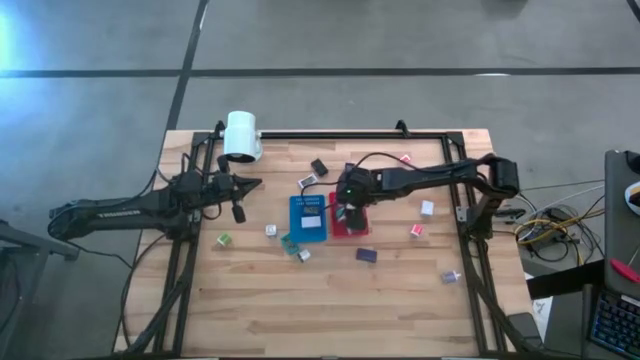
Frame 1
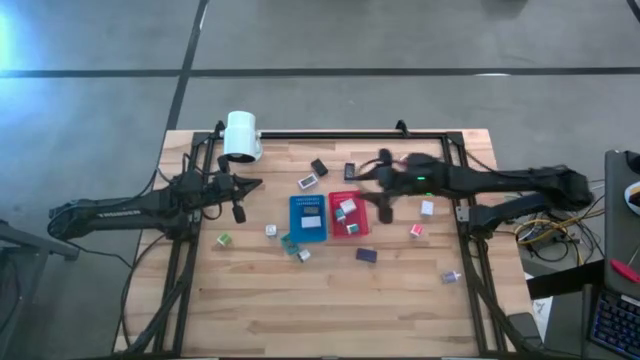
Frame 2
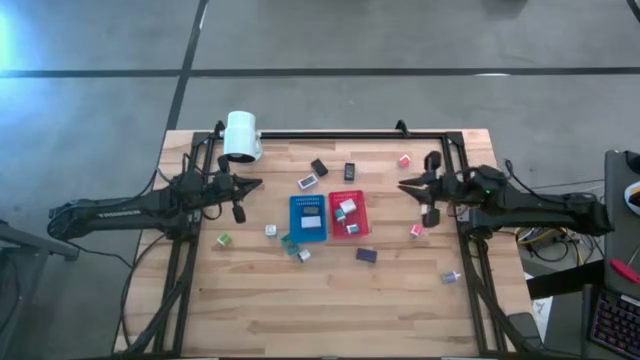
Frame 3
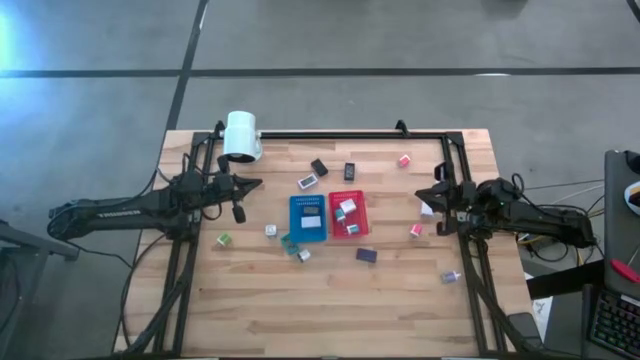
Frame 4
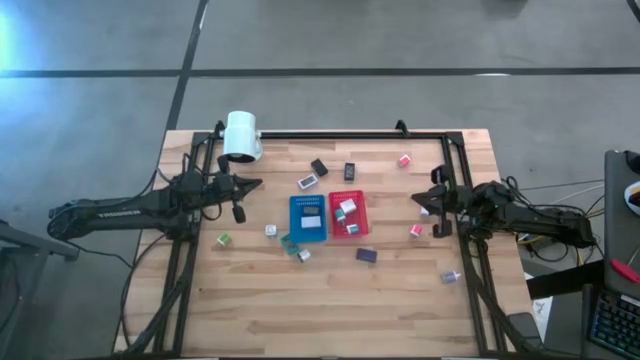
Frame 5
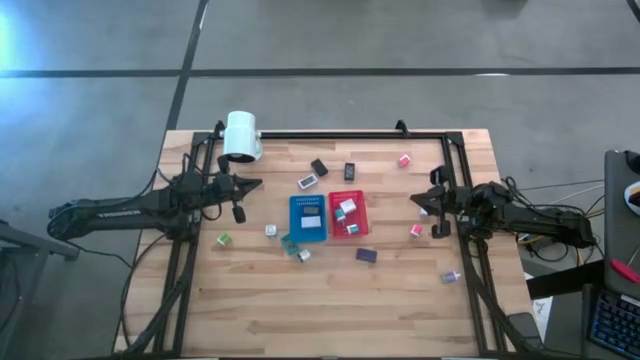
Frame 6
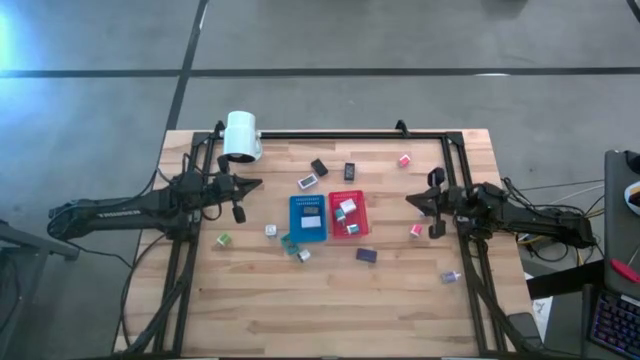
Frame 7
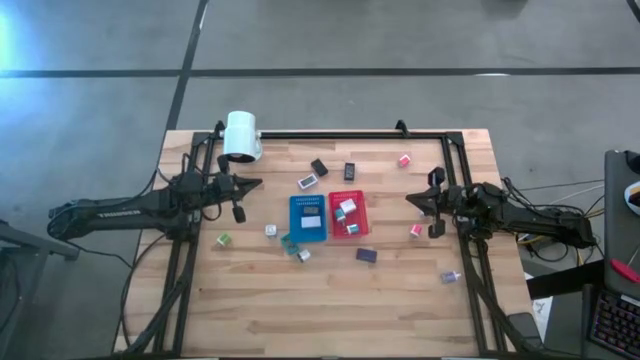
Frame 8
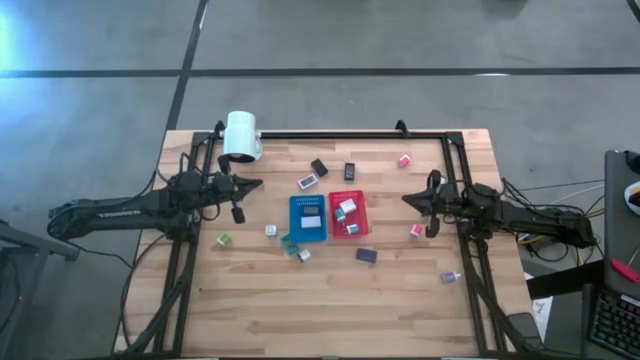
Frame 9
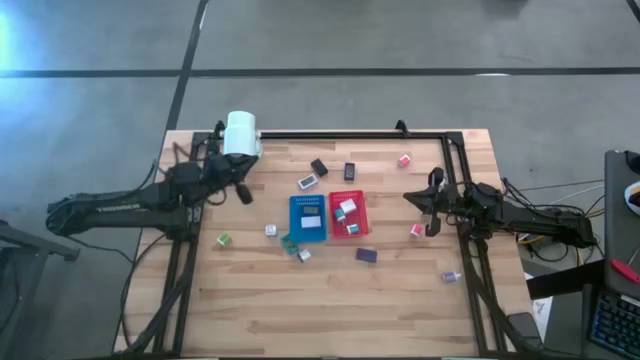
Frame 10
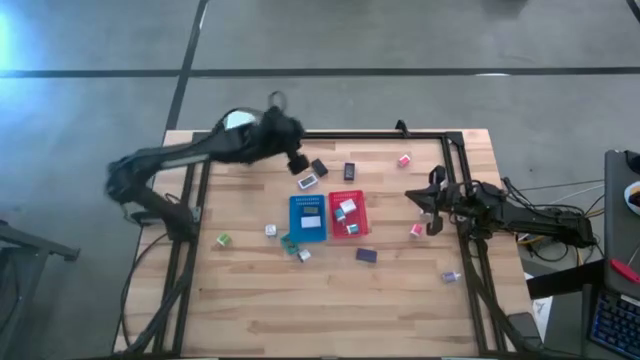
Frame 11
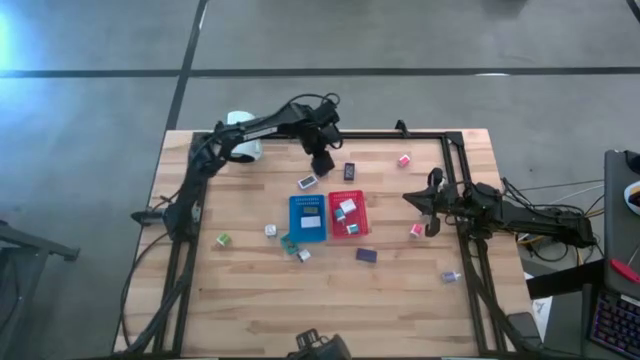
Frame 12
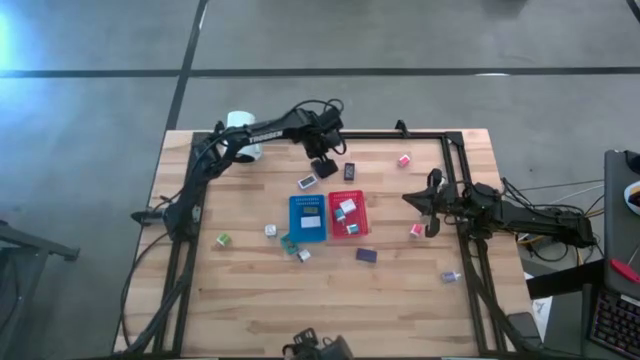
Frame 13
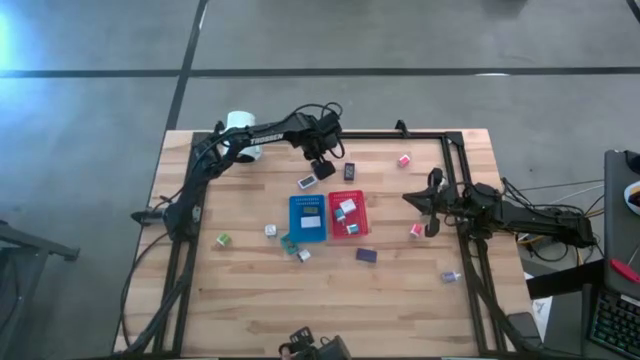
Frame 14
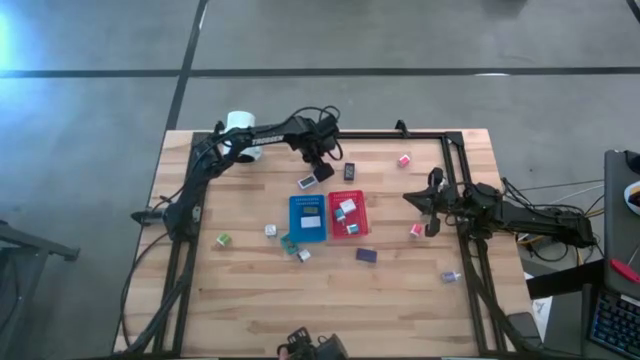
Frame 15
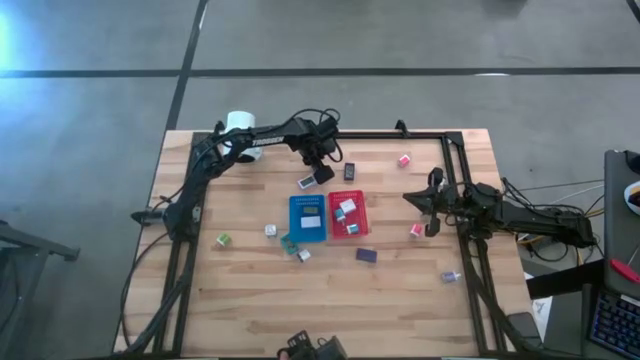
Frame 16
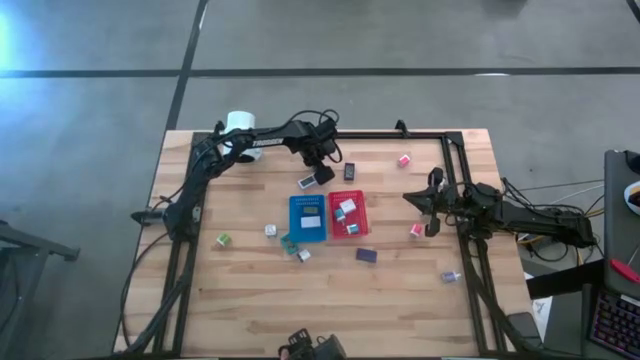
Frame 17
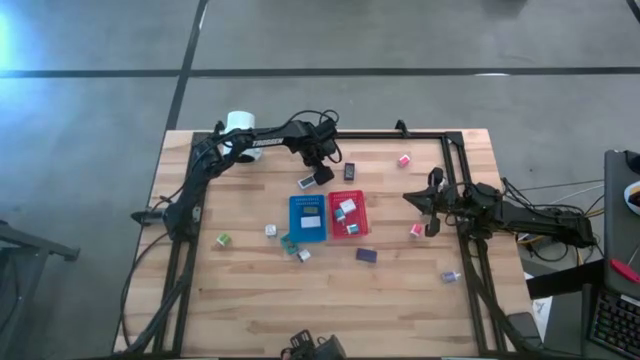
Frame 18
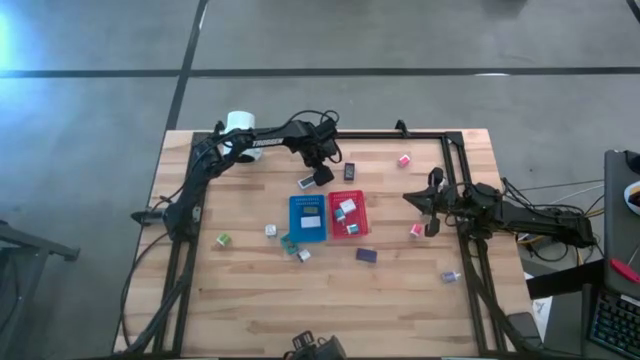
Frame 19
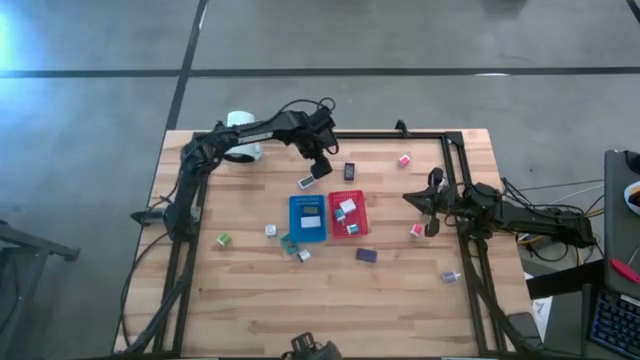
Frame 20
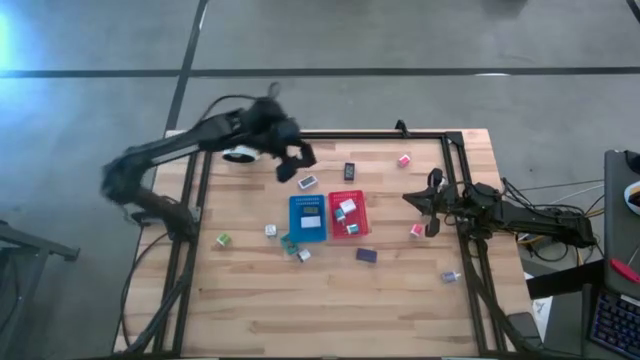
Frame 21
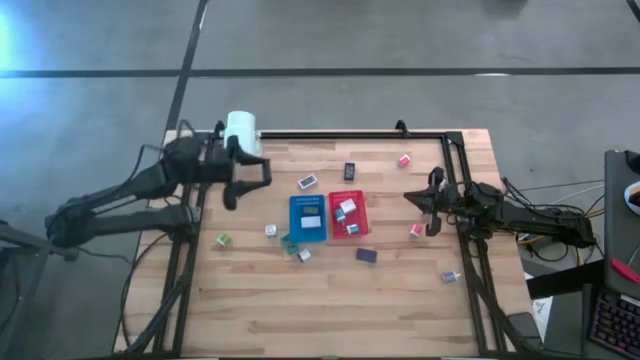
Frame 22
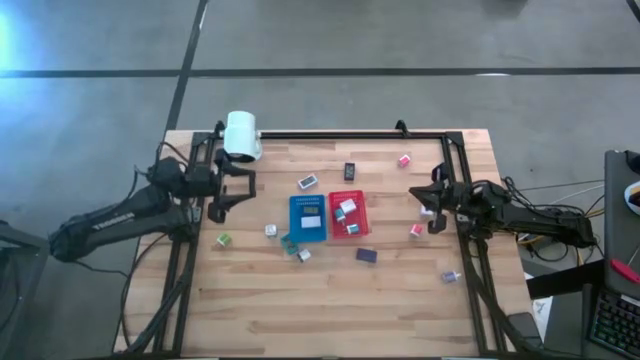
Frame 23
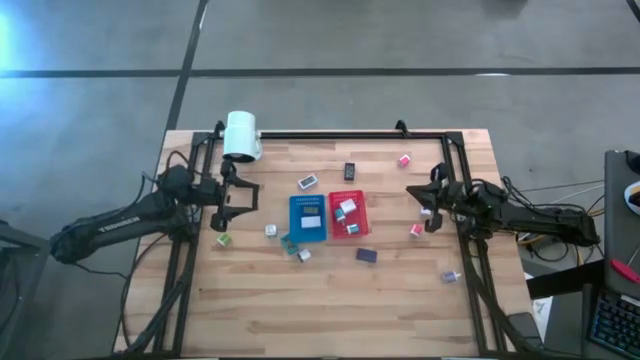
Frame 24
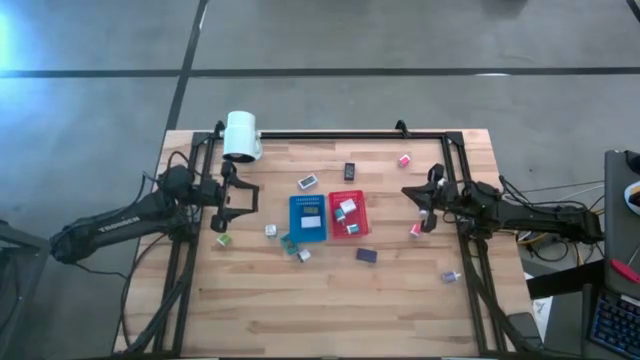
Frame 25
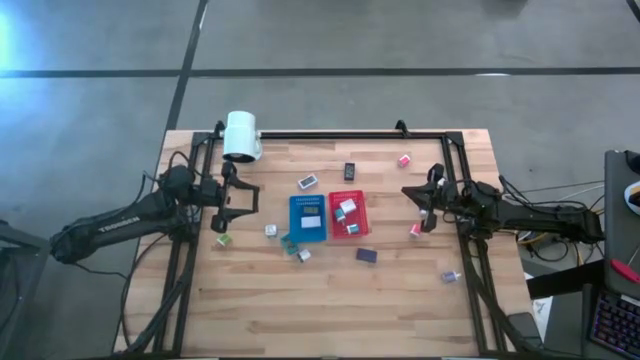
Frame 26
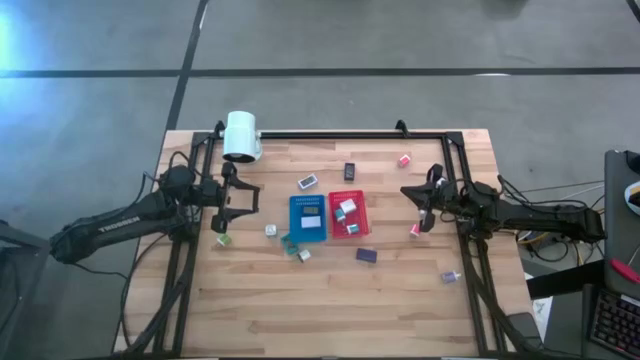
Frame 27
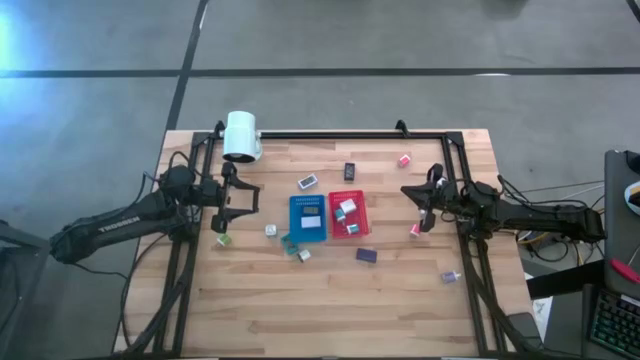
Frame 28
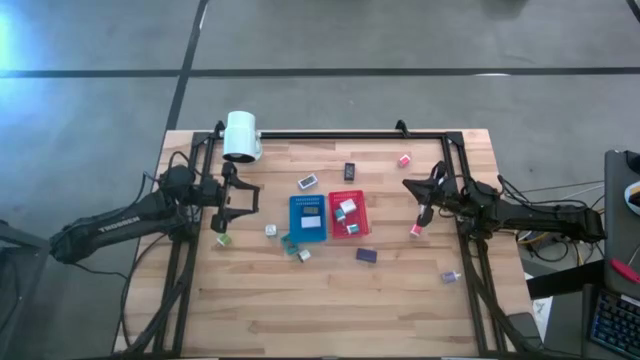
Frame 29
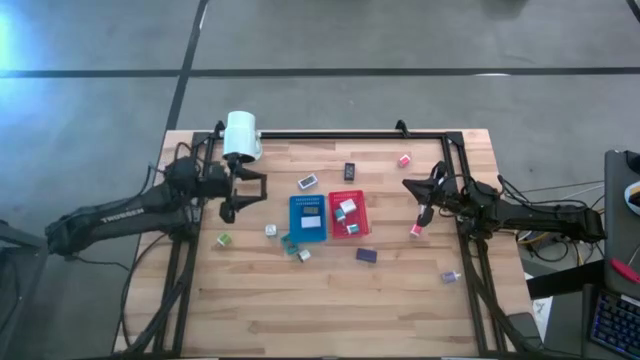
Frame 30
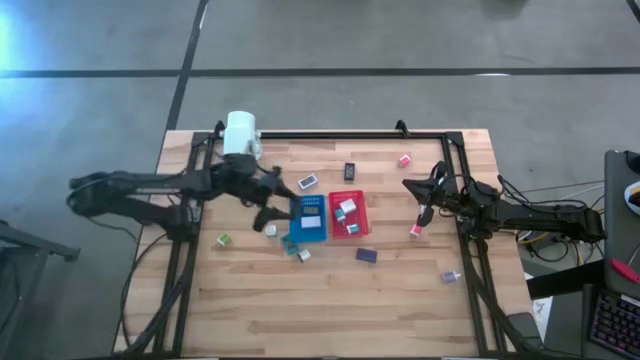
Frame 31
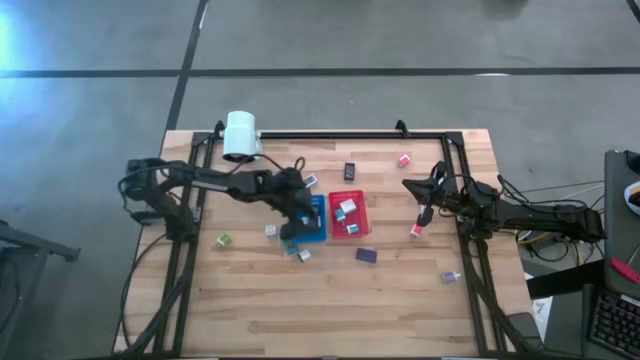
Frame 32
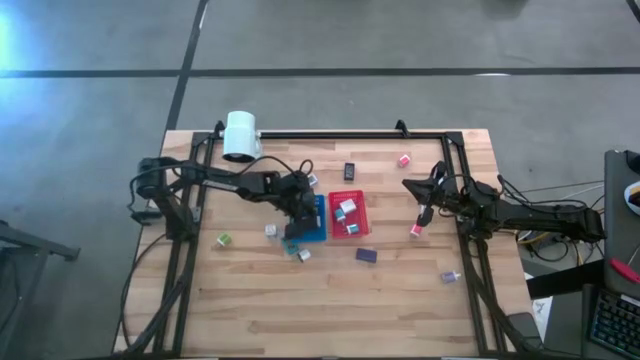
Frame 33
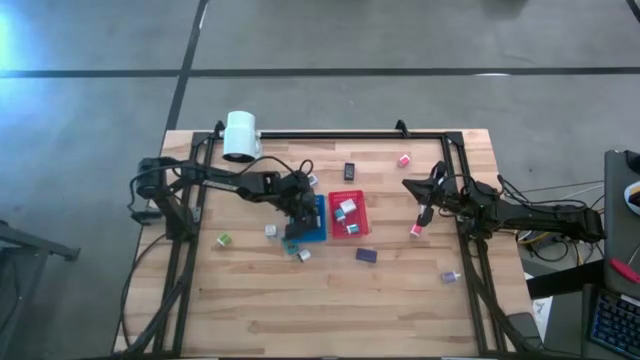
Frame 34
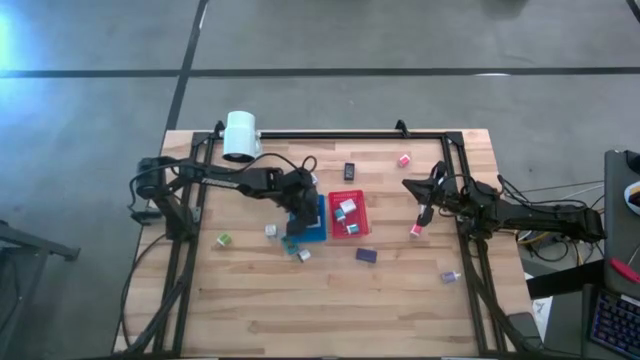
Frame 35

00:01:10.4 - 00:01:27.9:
Task: Pick & Place Office items
Put the black digital clock into the blue bin

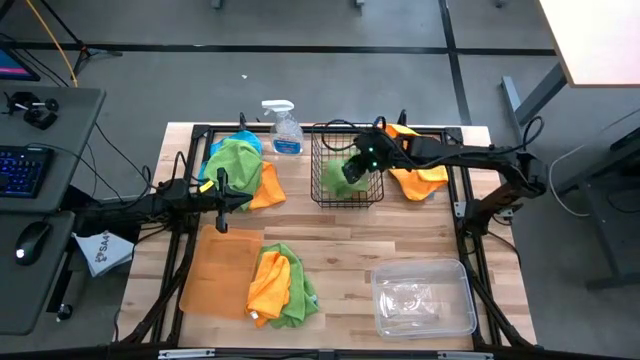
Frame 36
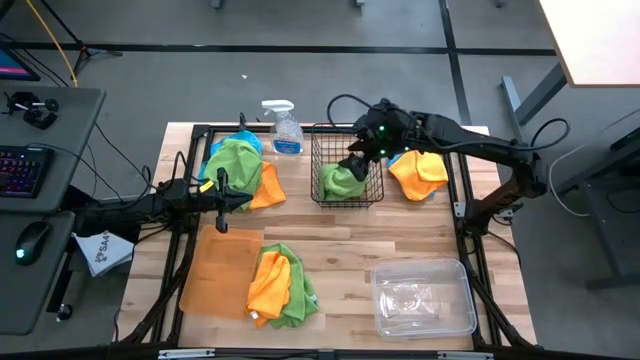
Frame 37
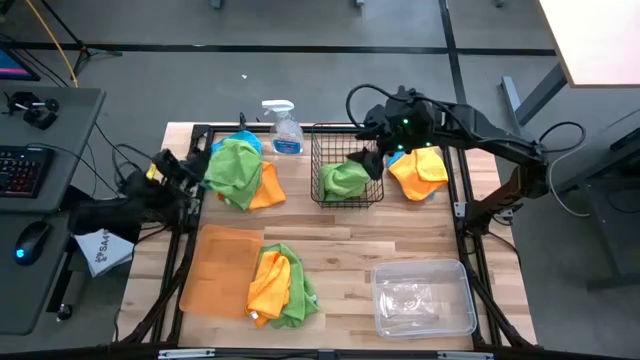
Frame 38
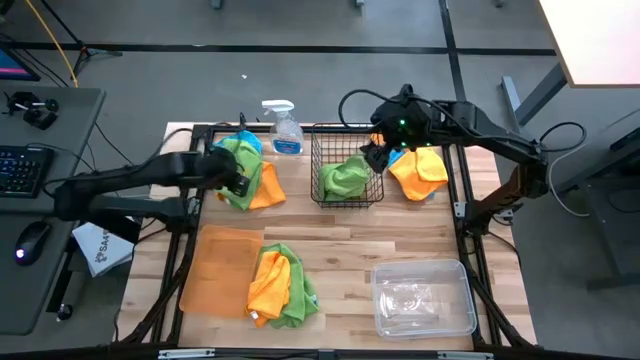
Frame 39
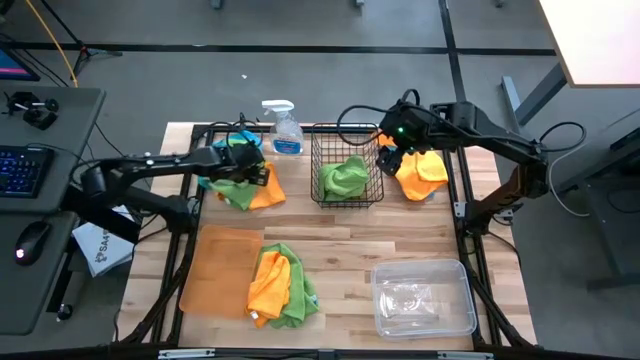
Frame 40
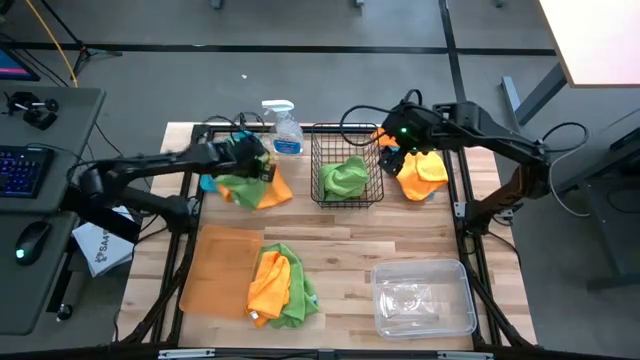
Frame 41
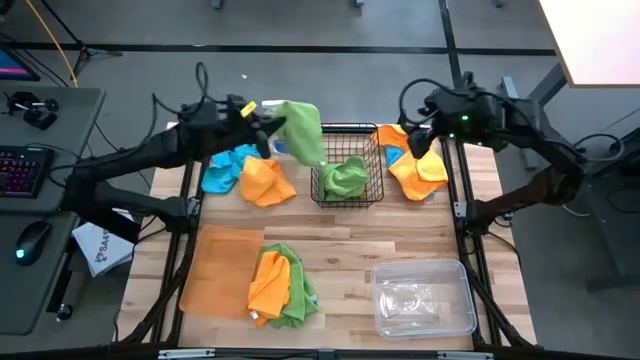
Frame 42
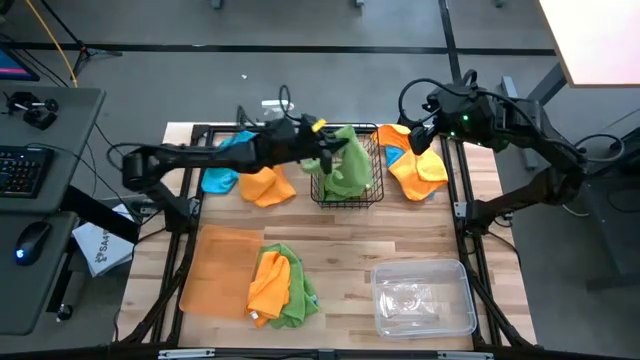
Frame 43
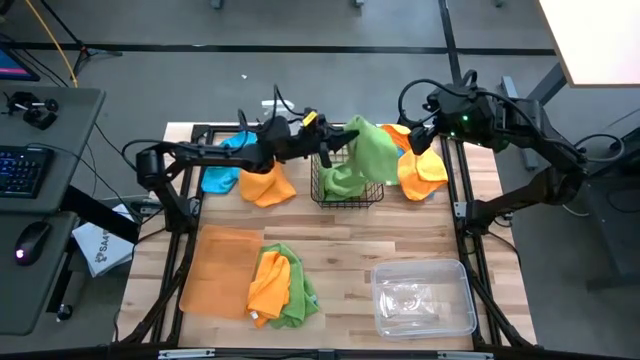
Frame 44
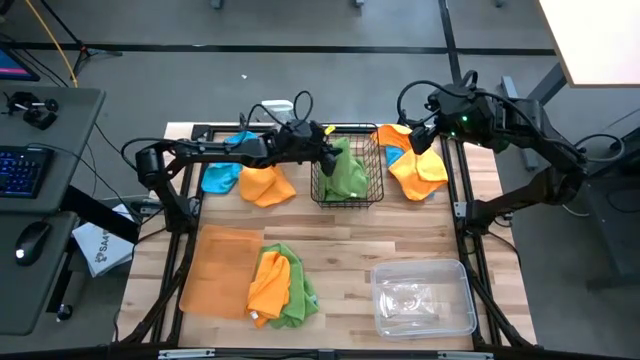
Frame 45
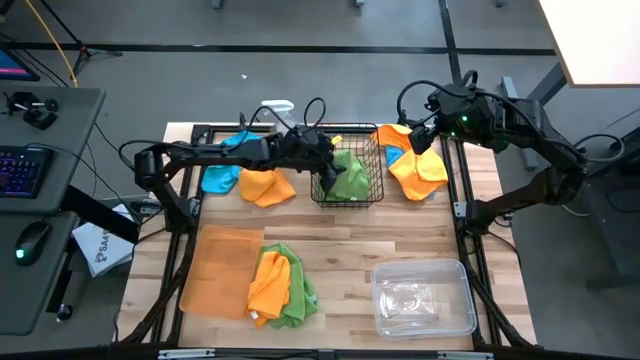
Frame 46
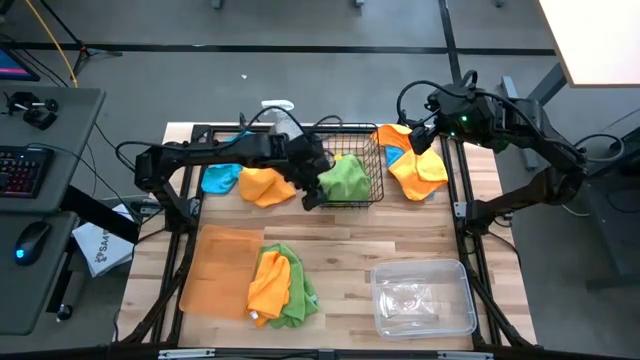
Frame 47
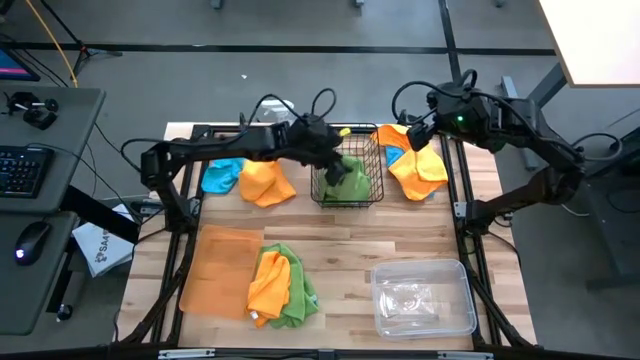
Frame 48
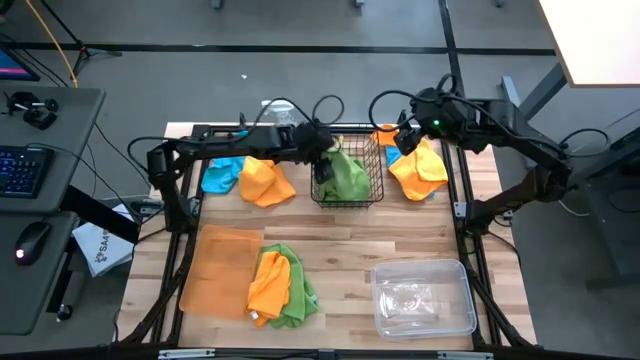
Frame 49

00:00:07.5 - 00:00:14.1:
Task: Sort microfiber towel by color & place in baskets
Put the top green microfiber cloth into the mesh basket
